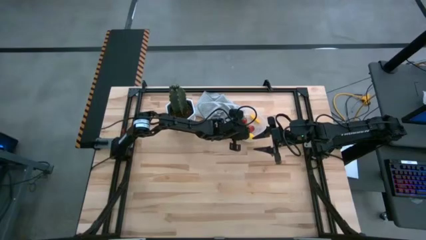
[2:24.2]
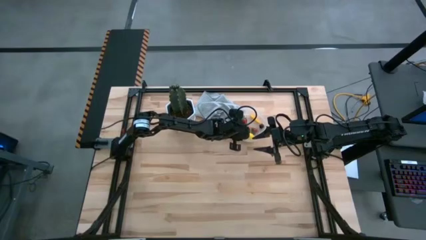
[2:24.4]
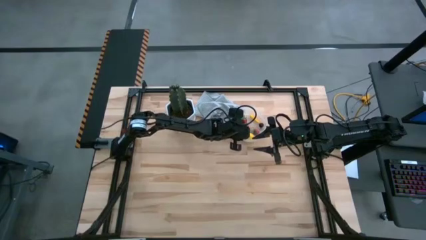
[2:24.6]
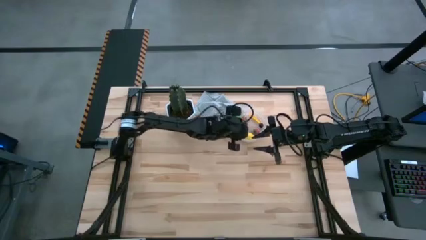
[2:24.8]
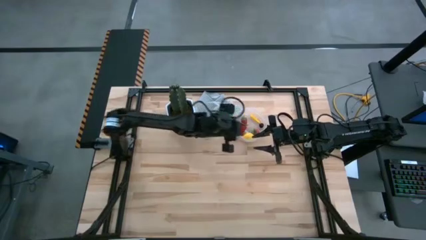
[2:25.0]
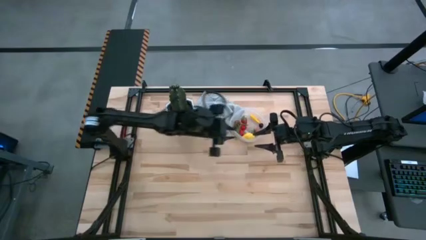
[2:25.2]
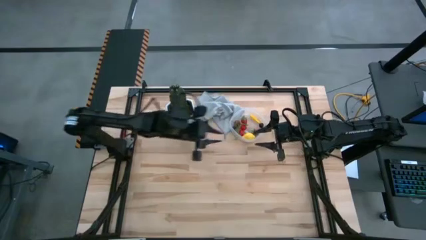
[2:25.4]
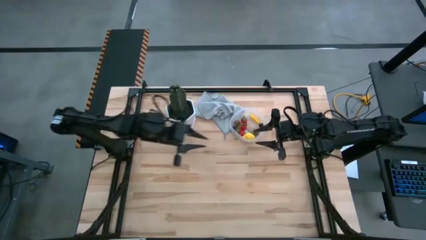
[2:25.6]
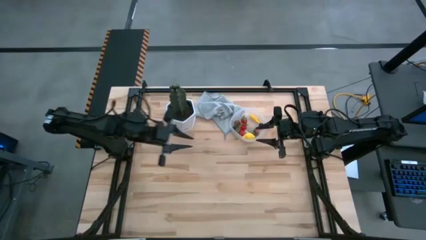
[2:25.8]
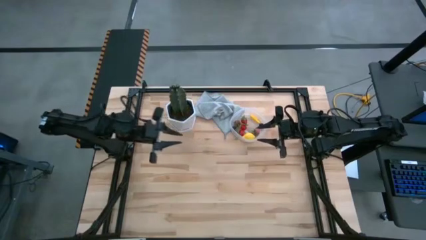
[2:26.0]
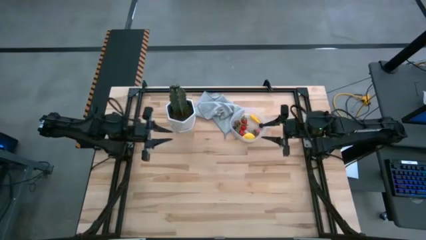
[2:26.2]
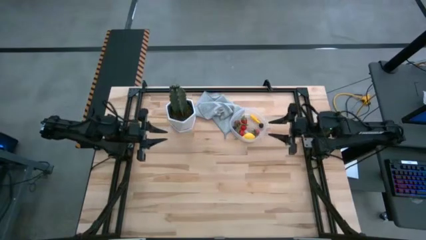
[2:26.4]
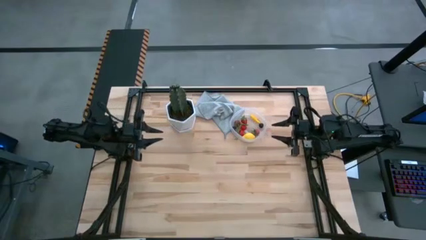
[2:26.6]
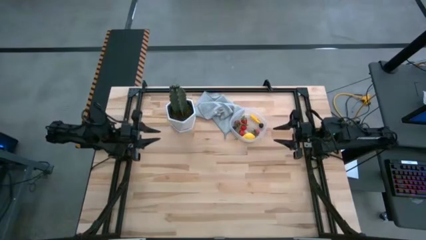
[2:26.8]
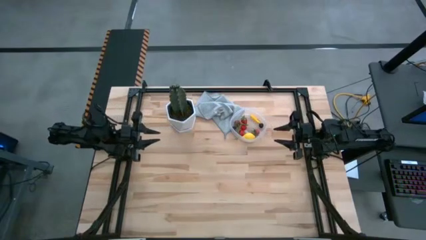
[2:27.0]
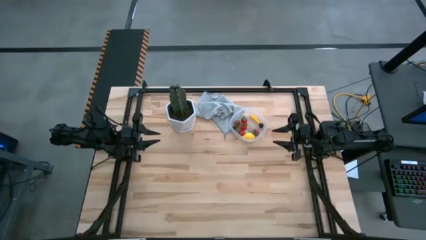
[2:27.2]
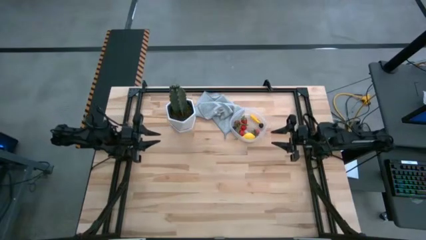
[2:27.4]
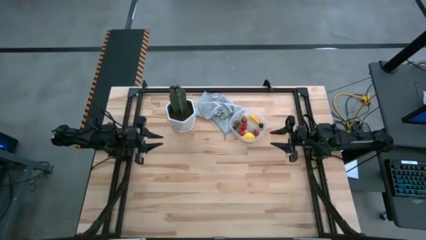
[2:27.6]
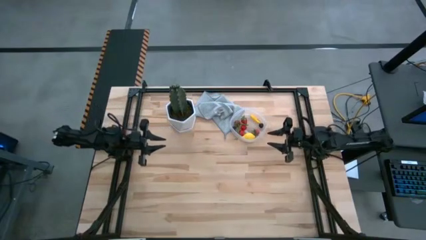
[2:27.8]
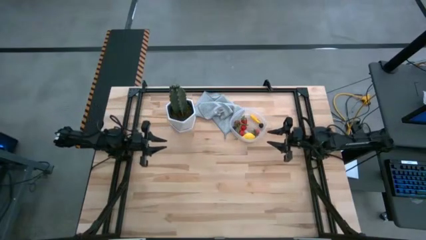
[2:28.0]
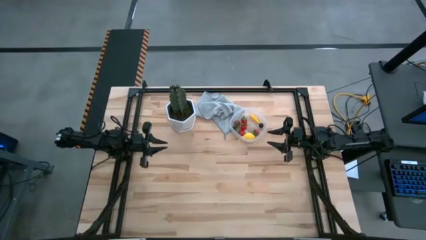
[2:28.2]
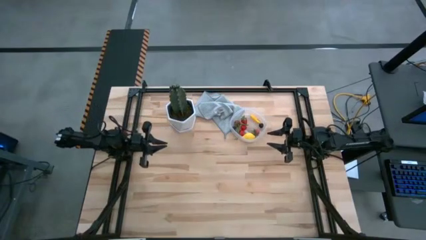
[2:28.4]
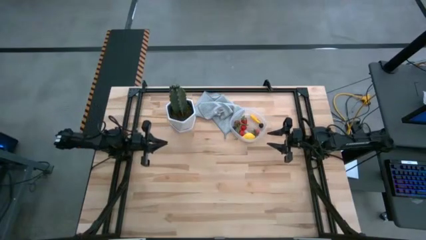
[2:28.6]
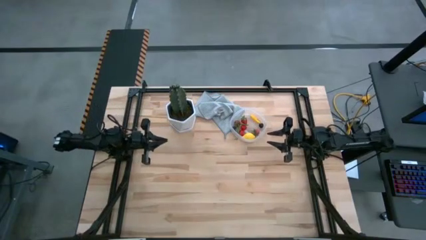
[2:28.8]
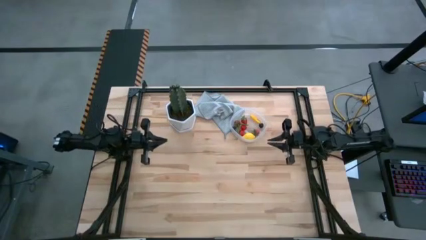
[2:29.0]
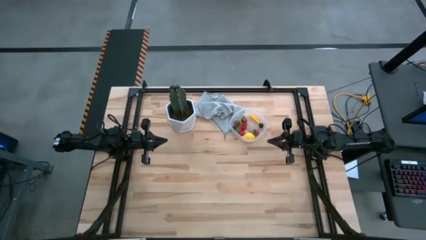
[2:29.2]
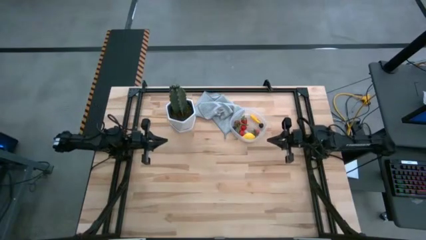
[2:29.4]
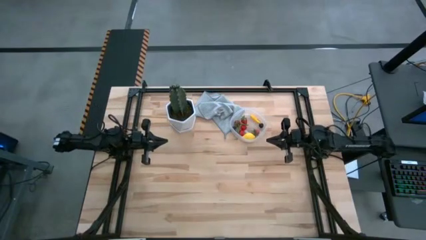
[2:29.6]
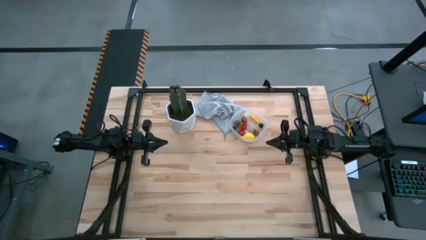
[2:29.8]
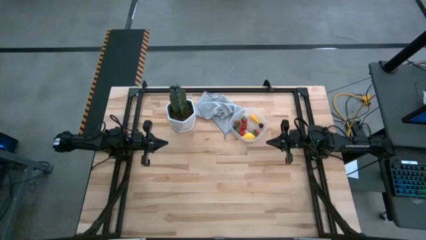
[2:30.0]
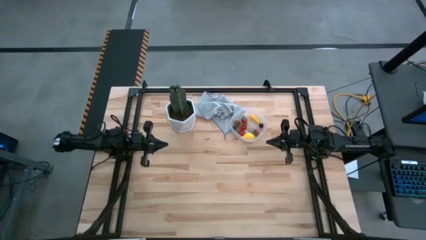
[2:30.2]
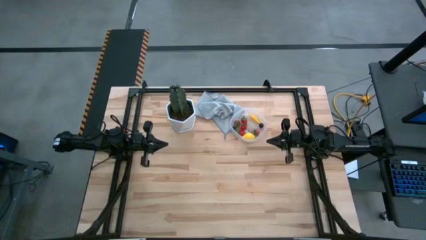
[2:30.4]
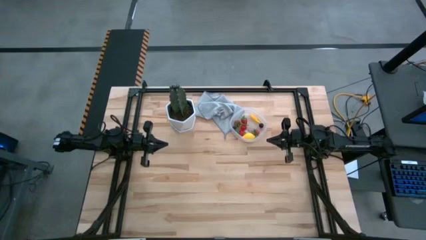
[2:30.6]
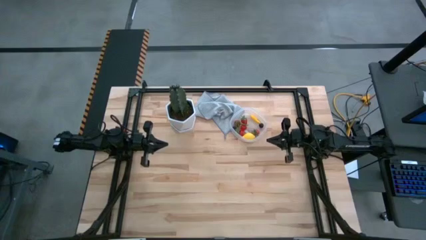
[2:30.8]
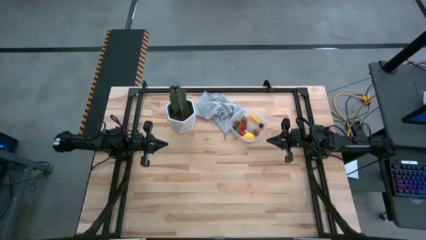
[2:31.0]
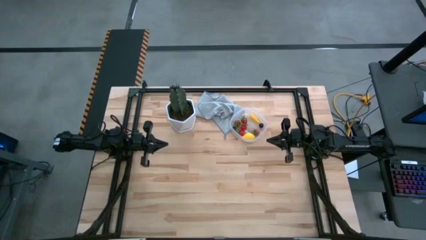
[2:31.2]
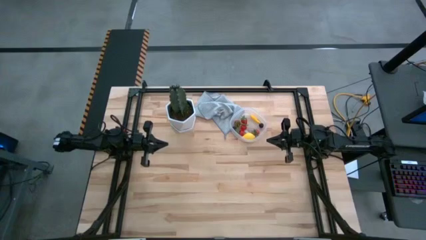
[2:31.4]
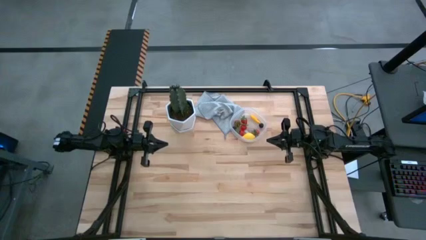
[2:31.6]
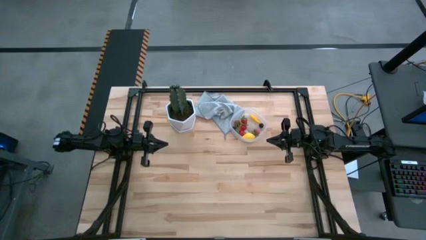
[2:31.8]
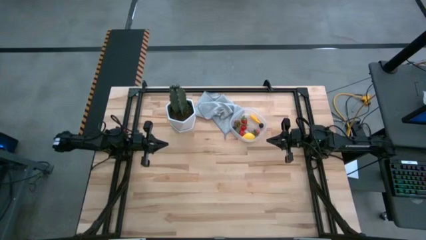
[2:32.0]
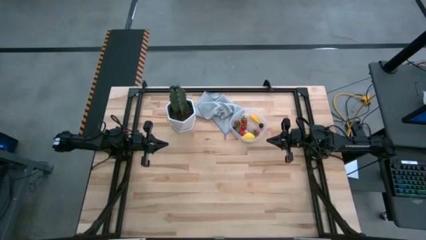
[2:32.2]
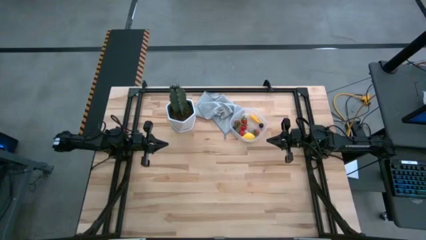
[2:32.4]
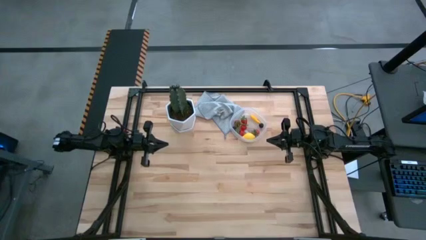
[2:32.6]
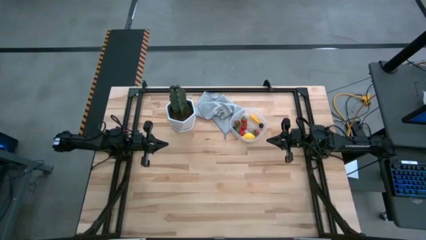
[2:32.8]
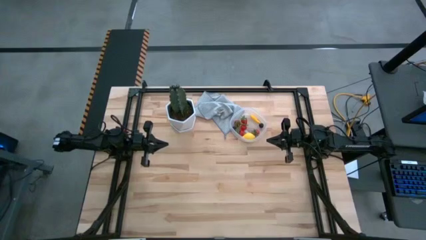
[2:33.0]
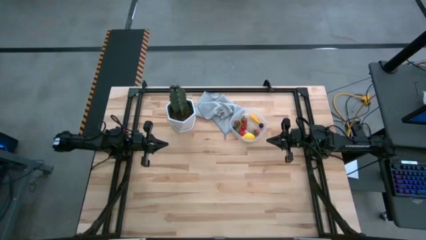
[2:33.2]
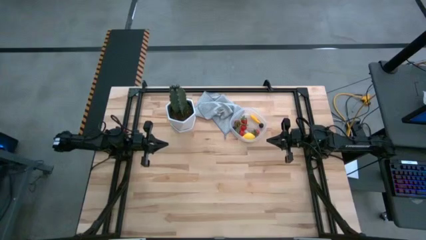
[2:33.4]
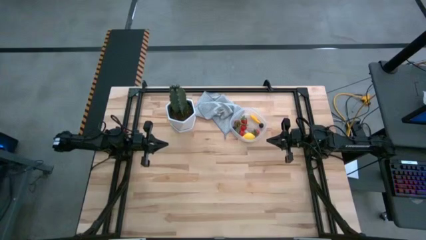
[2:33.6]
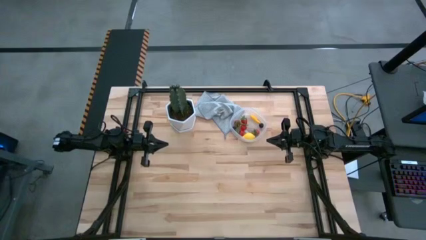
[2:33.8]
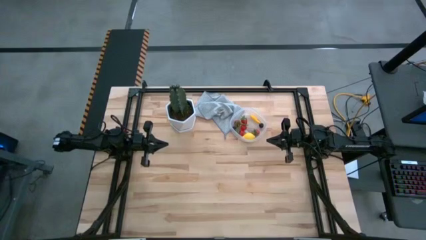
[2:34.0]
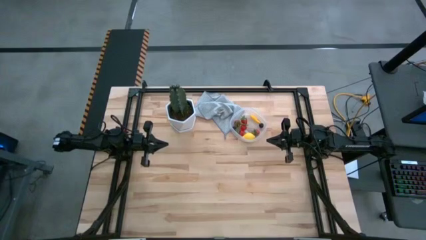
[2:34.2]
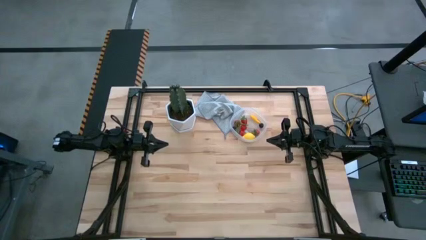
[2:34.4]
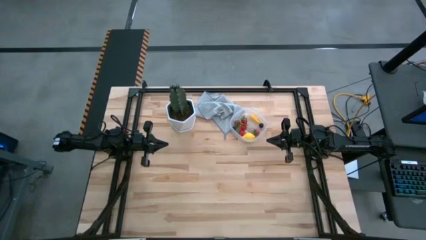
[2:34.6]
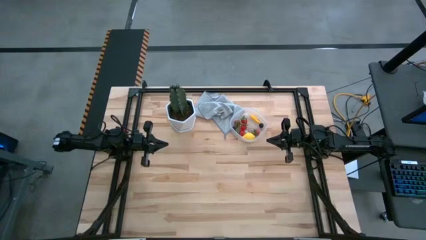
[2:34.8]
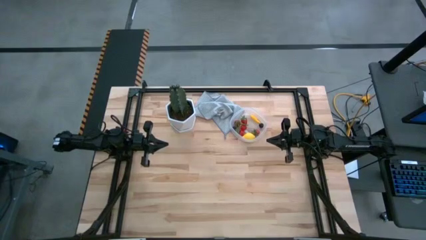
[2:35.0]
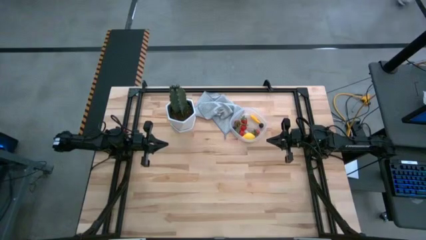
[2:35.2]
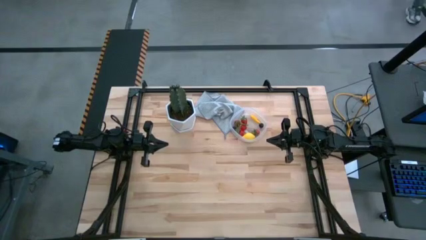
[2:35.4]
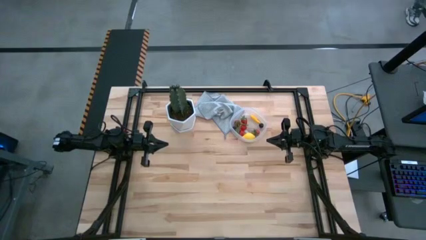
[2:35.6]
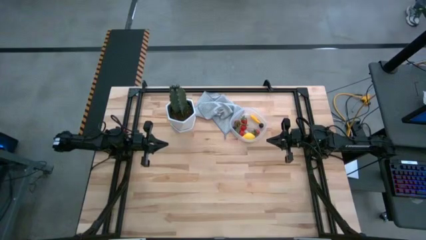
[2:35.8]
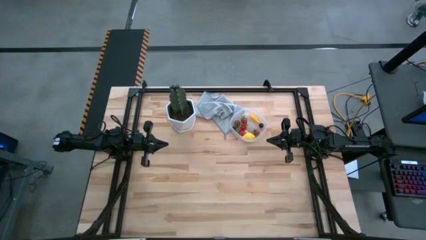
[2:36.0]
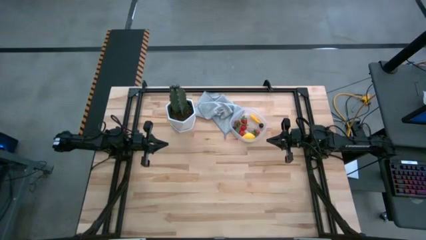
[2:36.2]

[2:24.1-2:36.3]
Task: Pick and placing Produce into tupperware
Return to Home Position

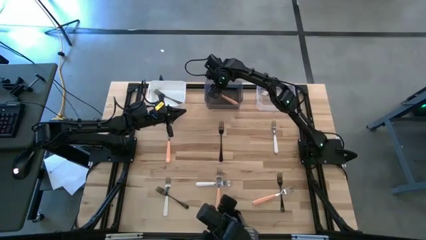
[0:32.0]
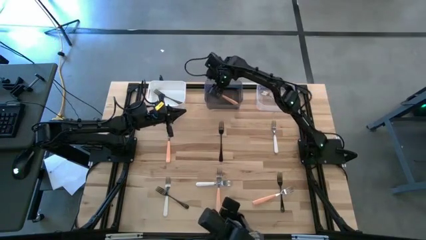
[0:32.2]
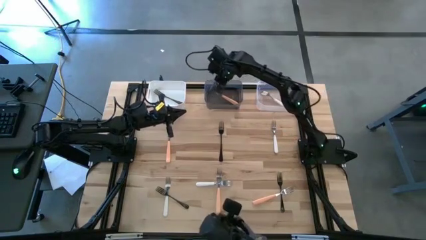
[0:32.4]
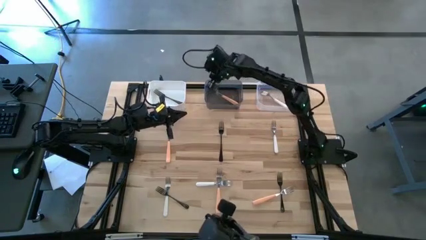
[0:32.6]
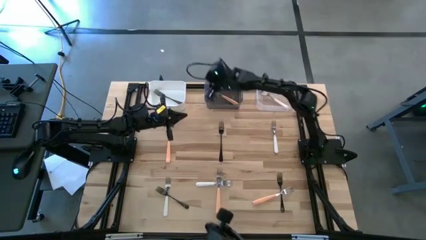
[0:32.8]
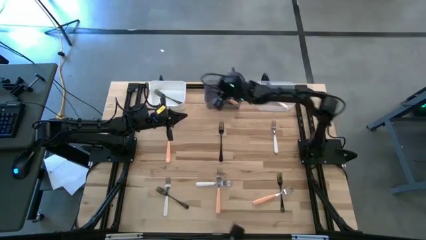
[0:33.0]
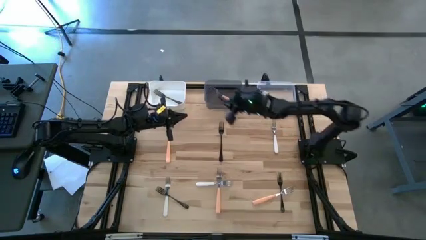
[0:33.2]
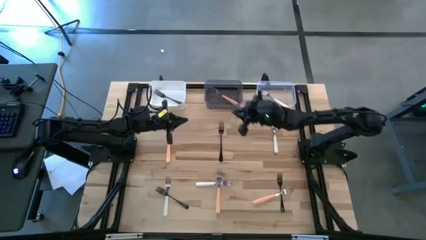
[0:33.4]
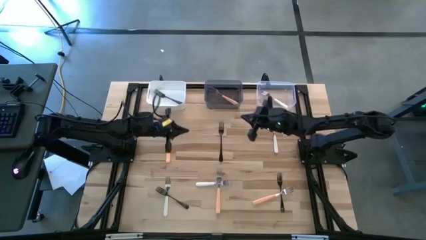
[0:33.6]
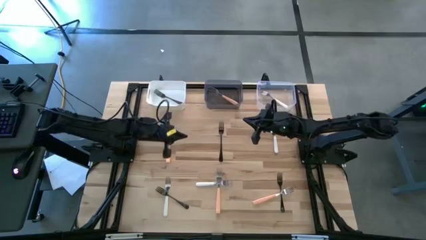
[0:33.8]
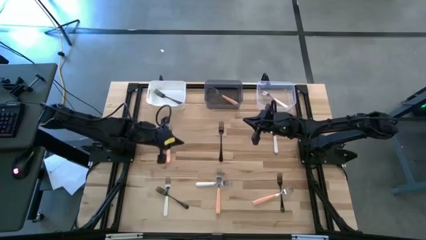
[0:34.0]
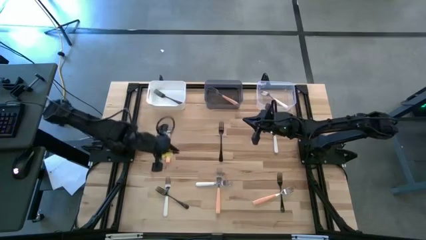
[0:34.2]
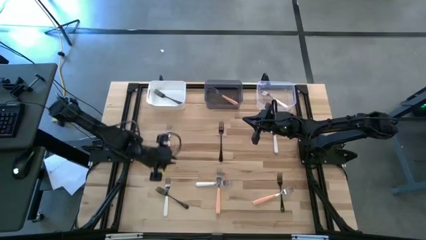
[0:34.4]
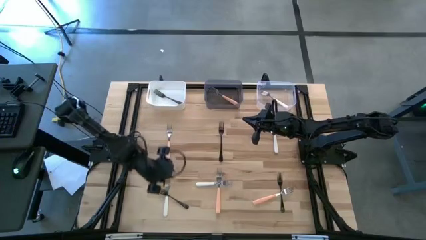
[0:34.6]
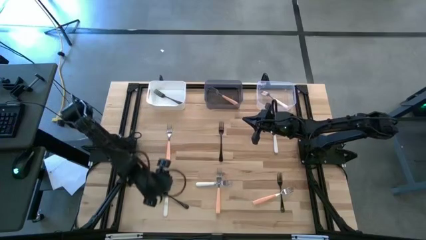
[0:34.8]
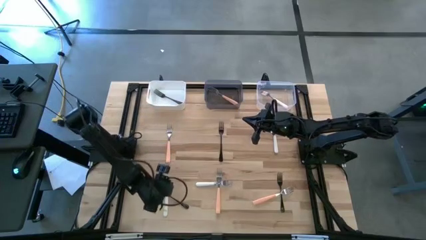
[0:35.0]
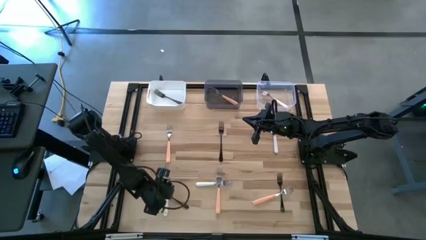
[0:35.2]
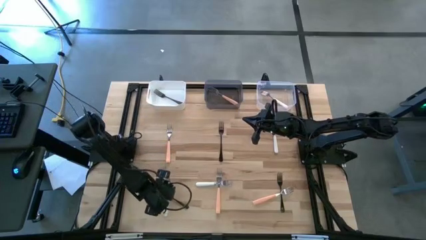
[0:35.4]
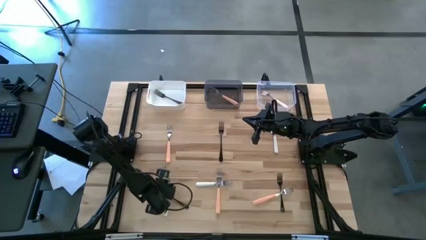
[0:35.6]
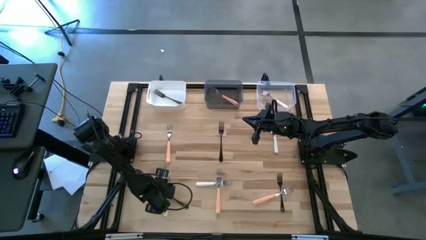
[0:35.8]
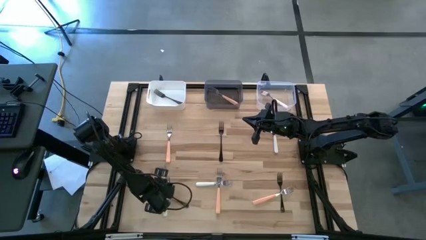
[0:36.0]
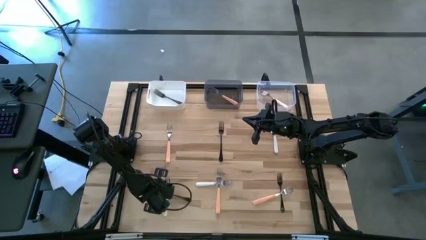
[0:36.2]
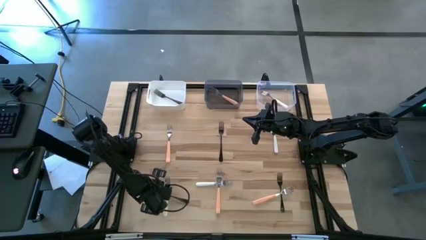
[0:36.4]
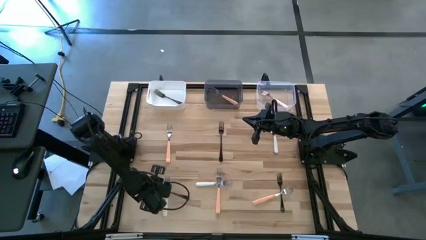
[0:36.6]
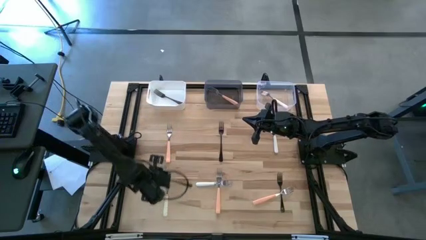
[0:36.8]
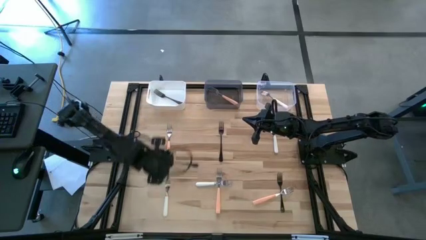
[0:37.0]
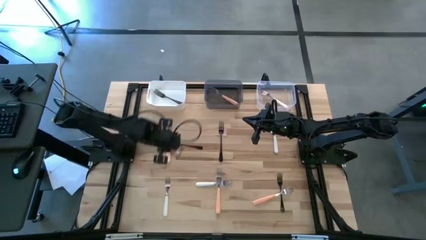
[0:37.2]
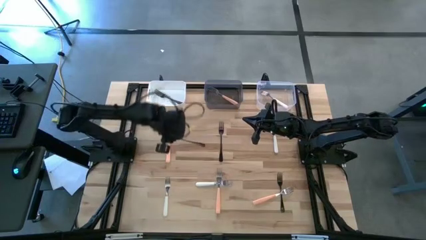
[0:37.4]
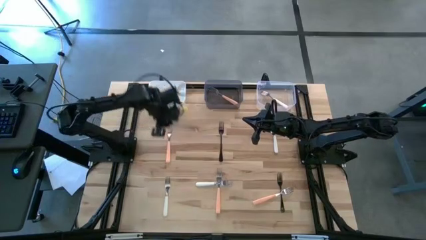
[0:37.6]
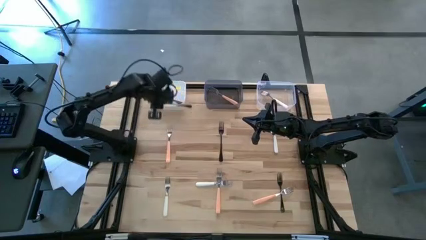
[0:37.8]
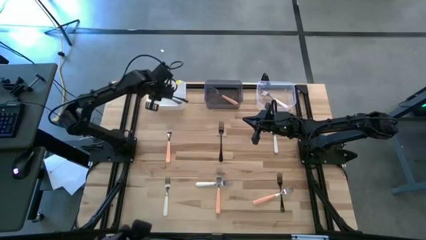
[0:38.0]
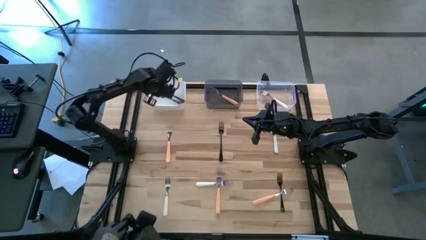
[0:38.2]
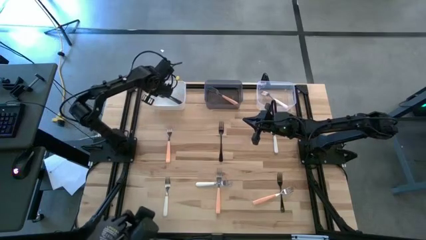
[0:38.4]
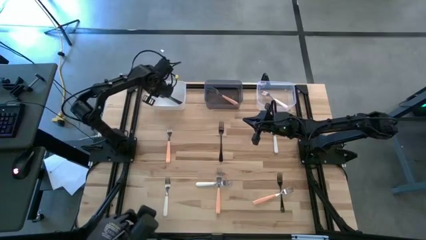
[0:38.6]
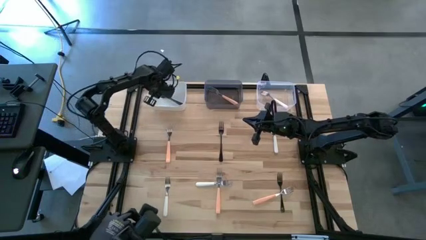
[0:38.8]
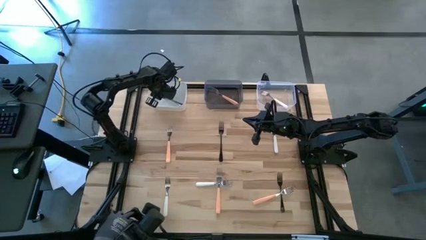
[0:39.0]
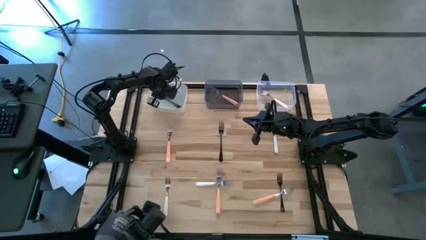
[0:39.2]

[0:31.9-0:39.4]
Task: Sort silverware by color (type)
Put the bottom left black fork into the white bin
